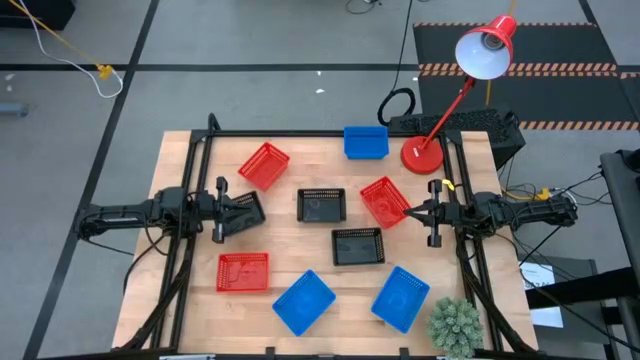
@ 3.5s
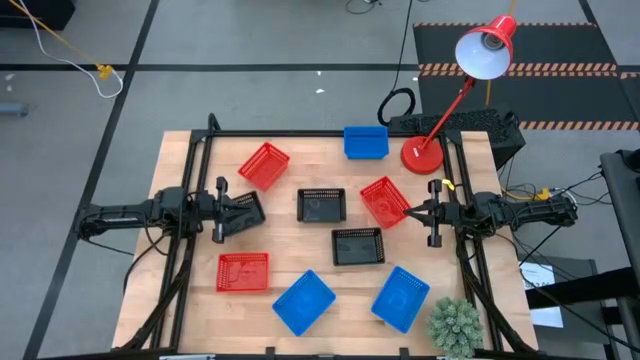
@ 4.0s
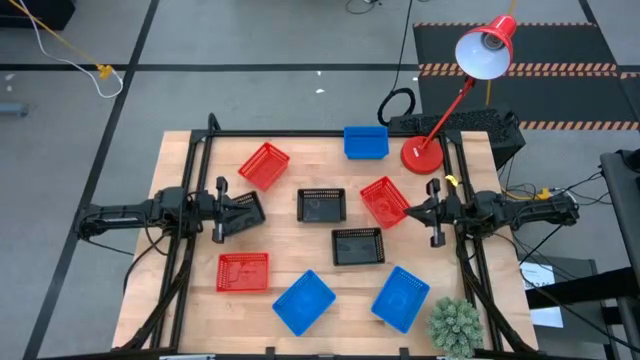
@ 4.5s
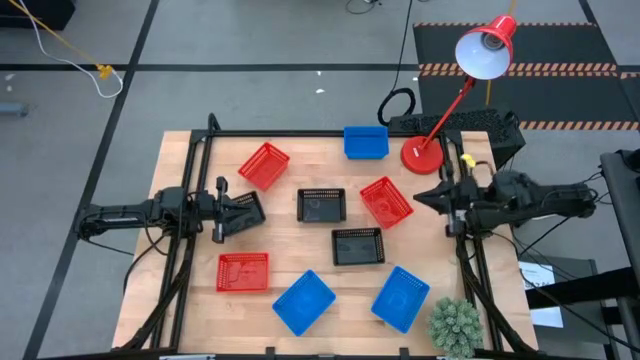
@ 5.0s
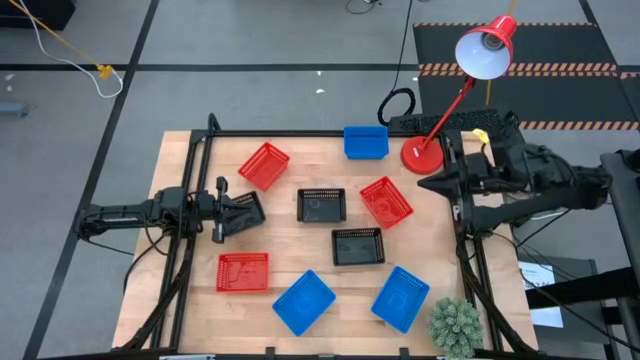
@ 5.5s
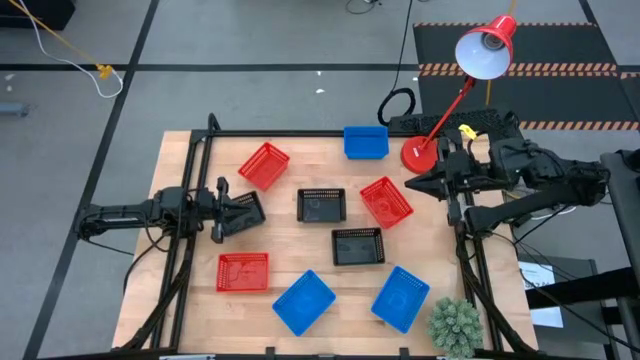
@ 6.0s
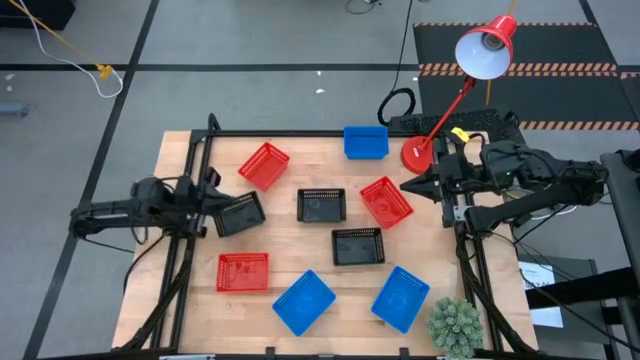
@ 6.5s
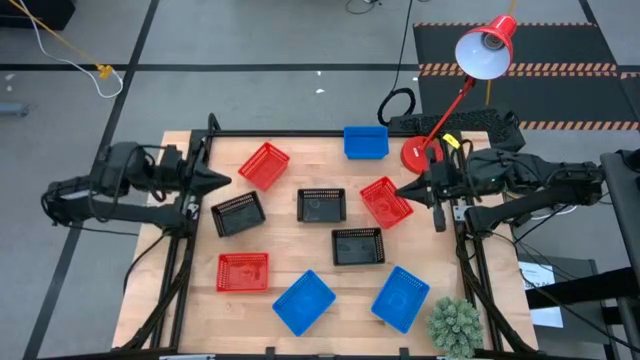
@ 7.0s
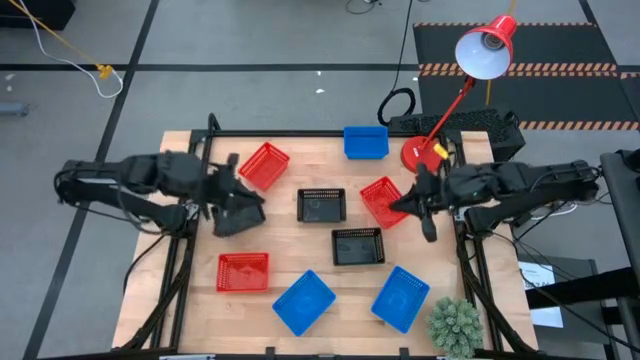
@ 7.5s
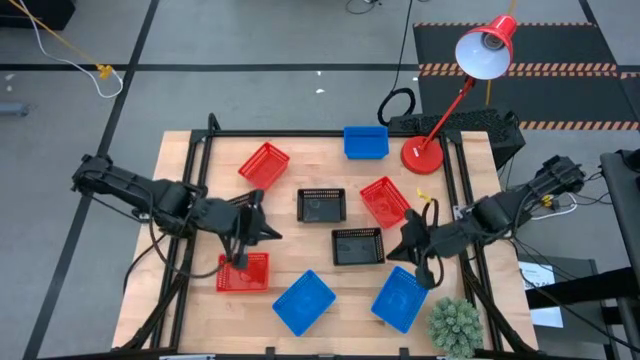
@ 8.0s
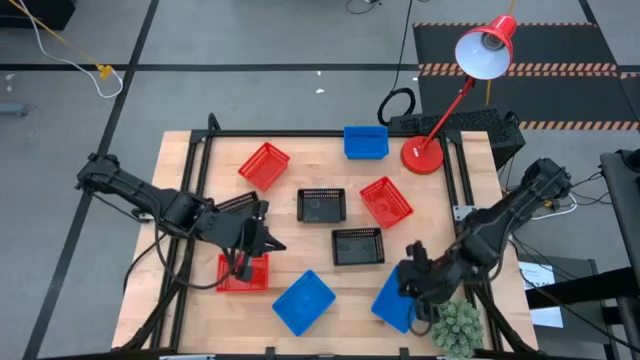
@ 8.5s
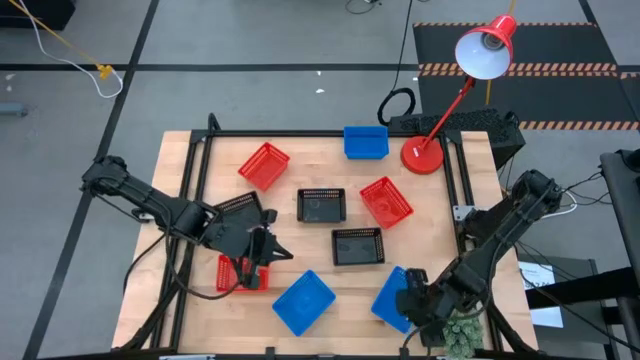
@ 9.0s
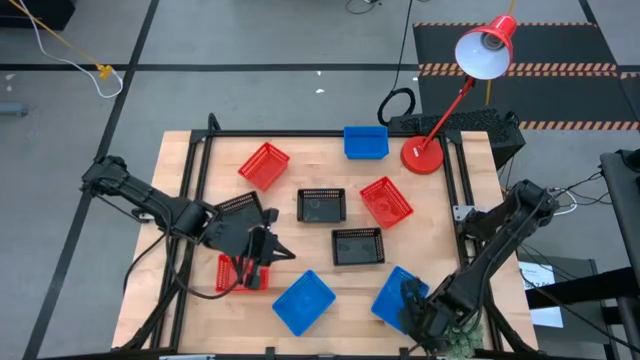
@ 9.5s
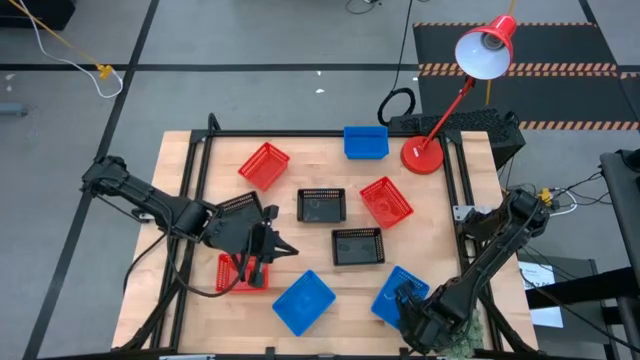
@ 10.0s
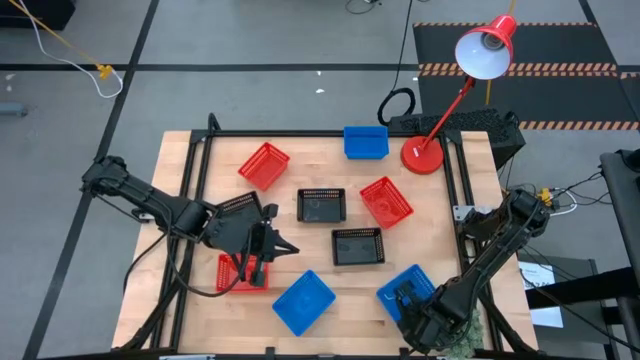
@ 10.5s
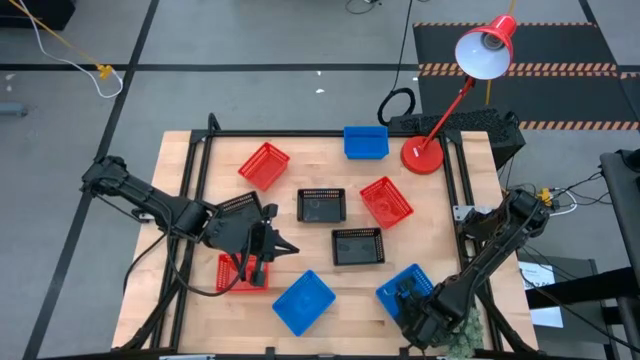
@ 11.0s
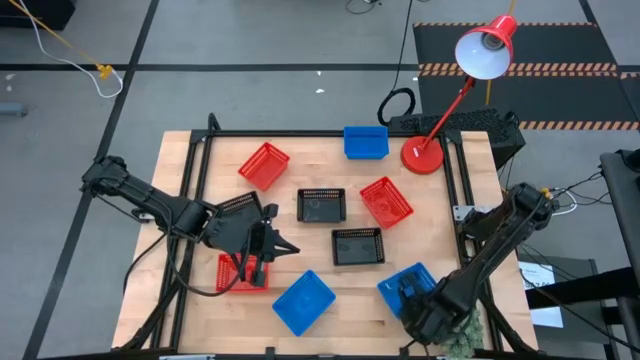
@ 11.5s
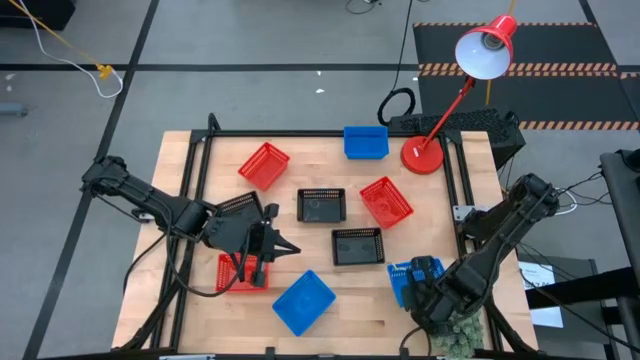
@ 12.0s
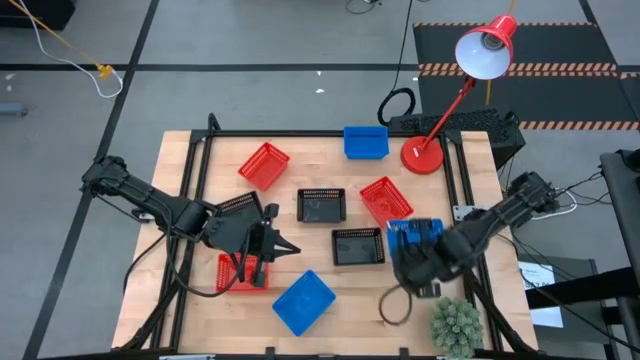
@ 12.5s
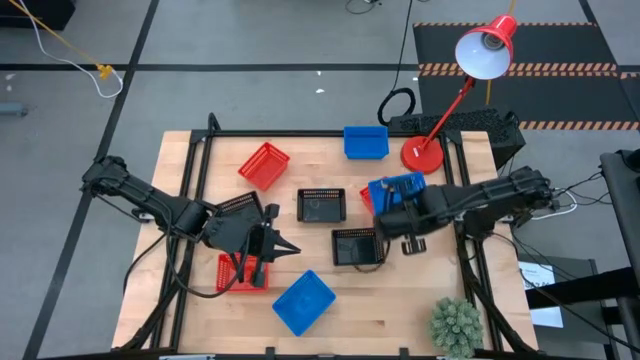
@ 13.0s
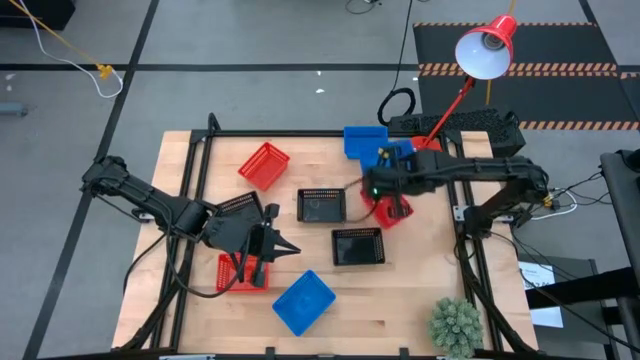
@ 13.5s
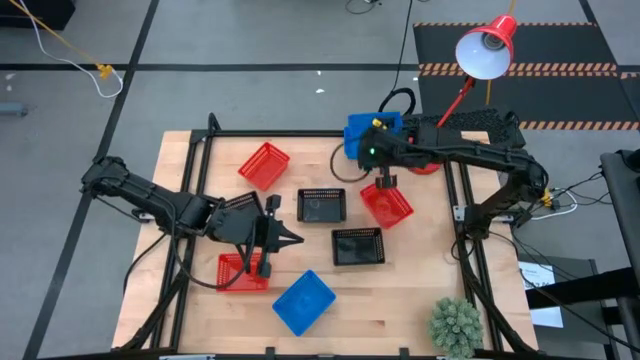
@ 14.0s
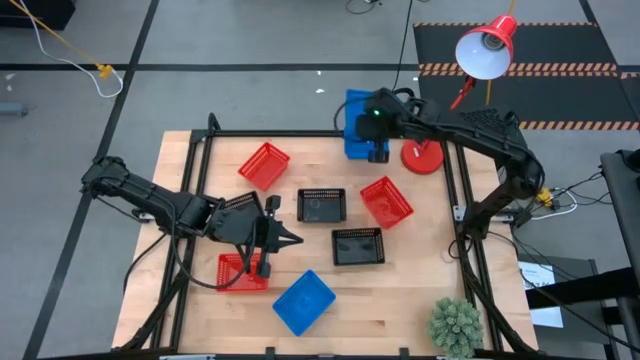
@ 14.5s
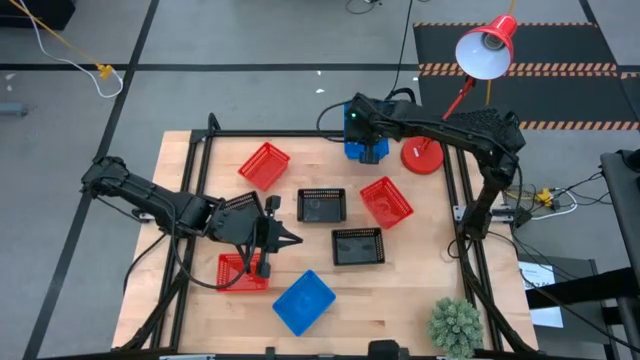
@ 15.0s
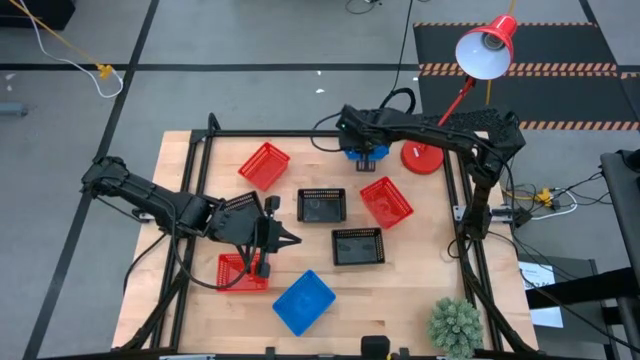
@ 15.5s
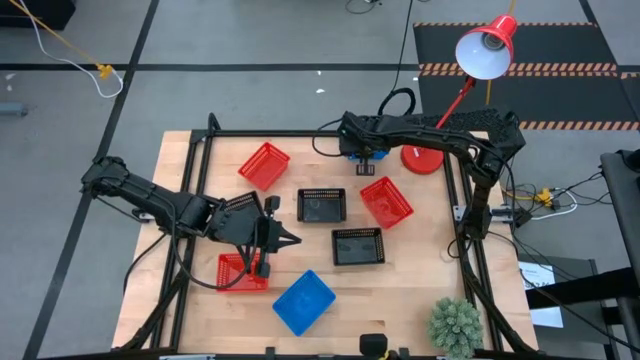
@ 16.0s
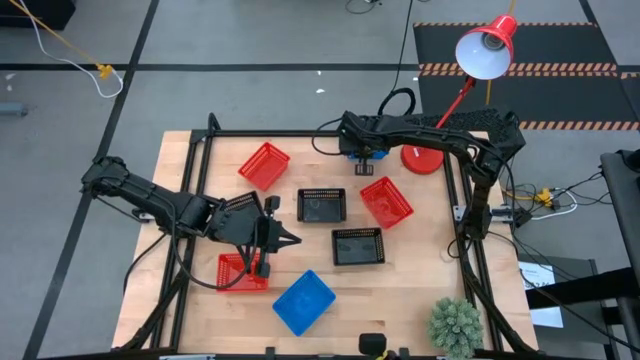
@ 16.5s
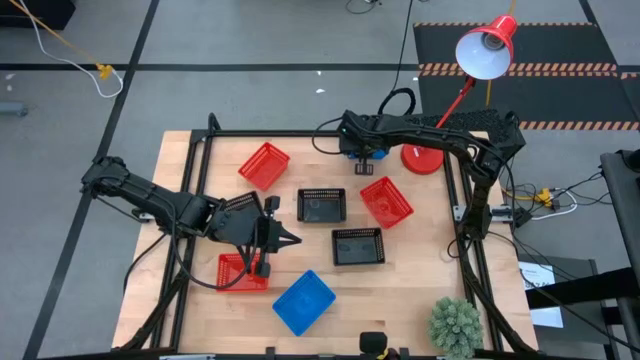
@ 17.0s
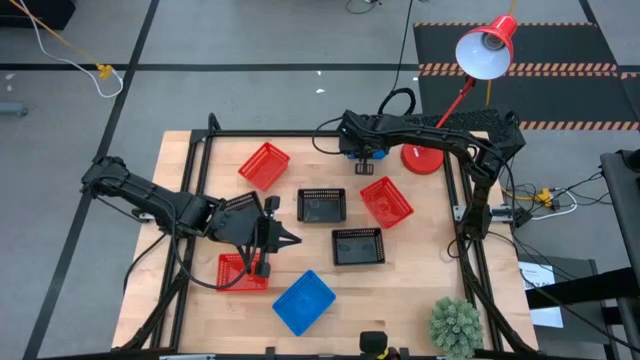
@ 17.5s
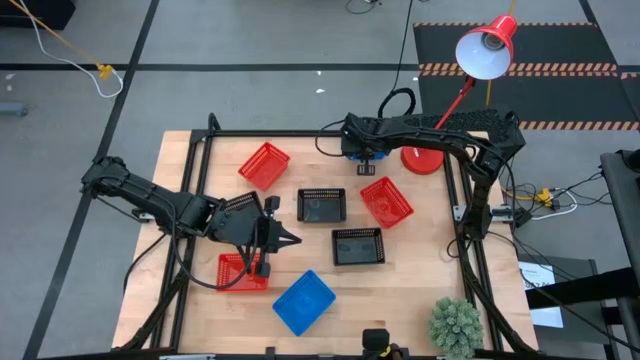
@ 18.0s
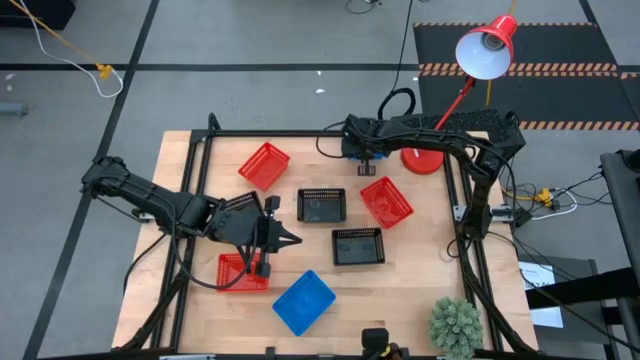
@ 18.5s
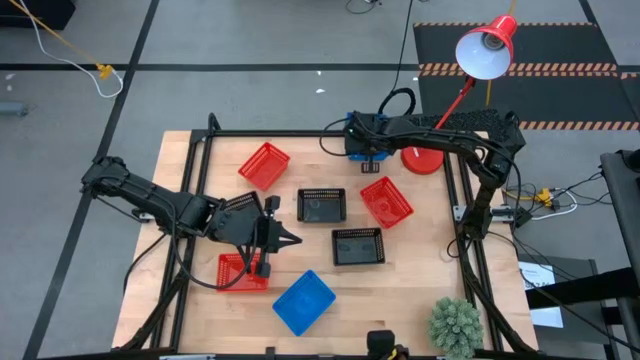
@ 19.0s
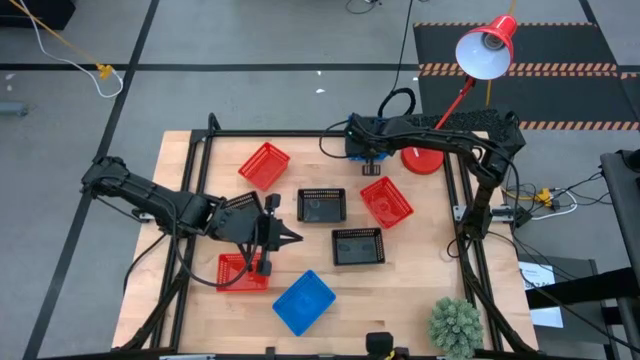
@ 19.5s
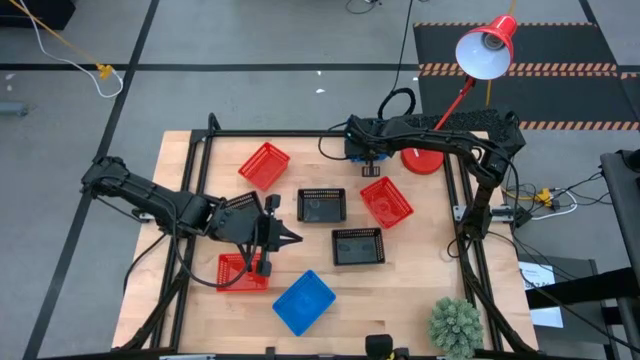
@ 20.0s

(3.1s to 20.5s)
Stack the bottom left blue basket on the top blue basket
